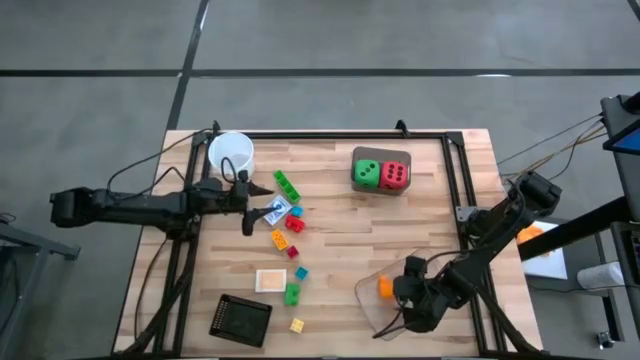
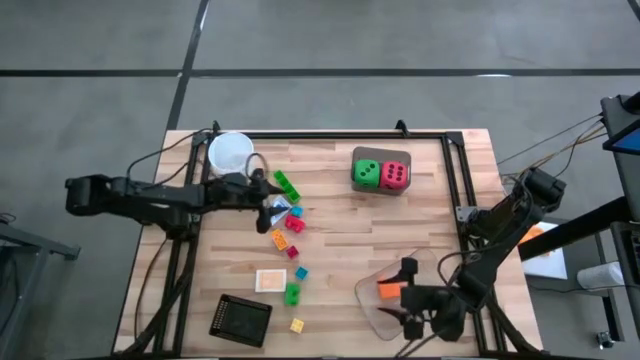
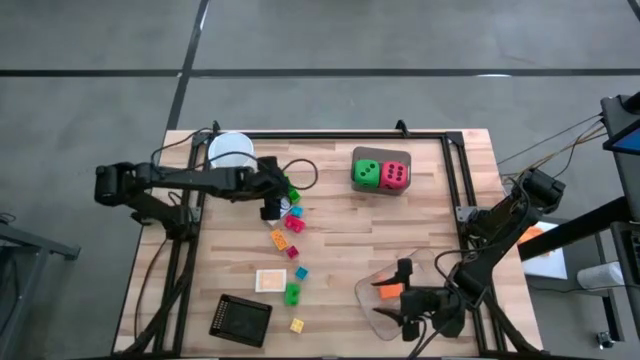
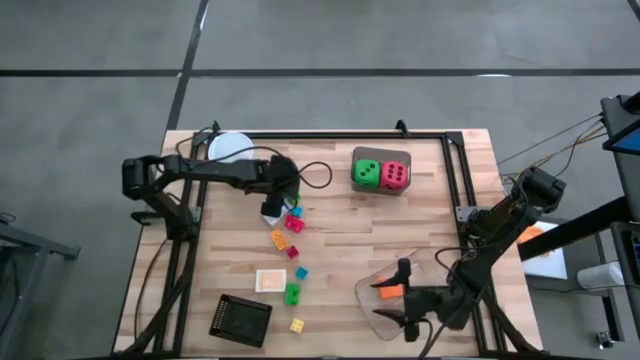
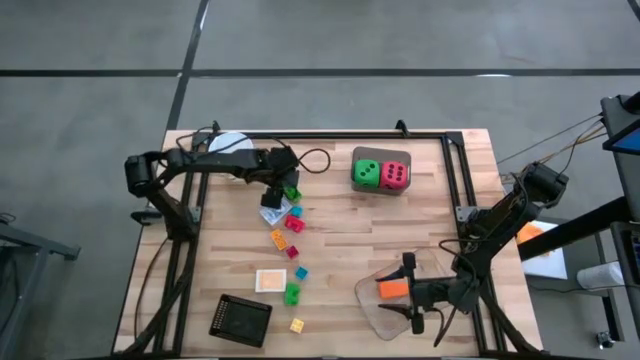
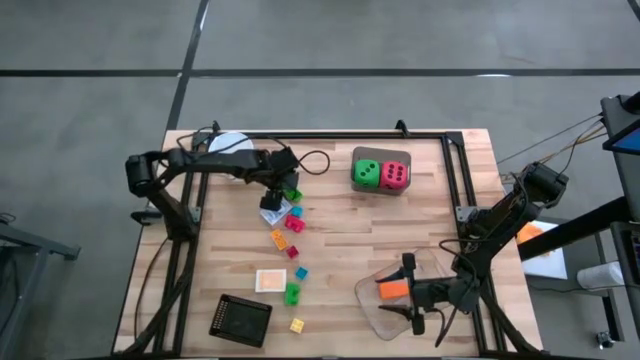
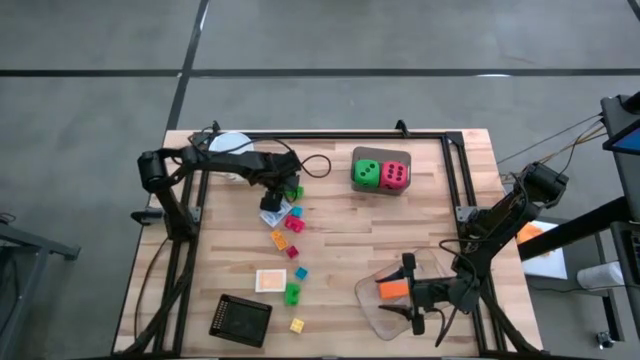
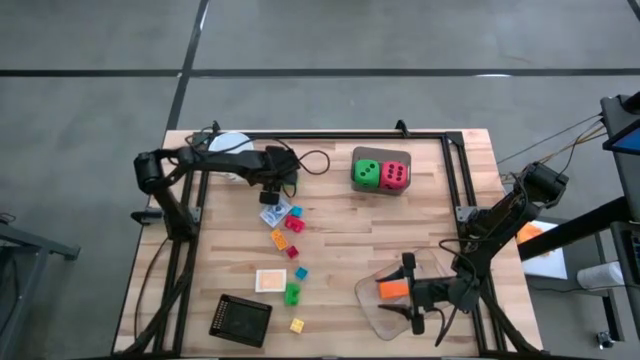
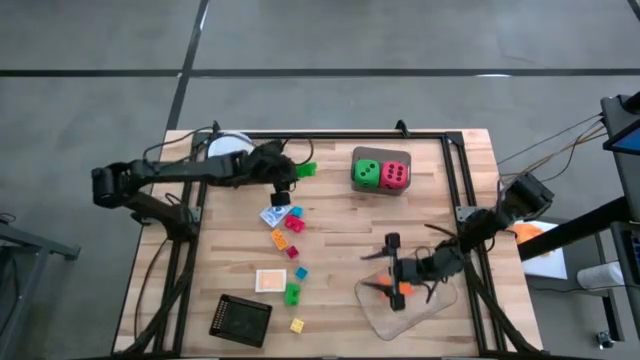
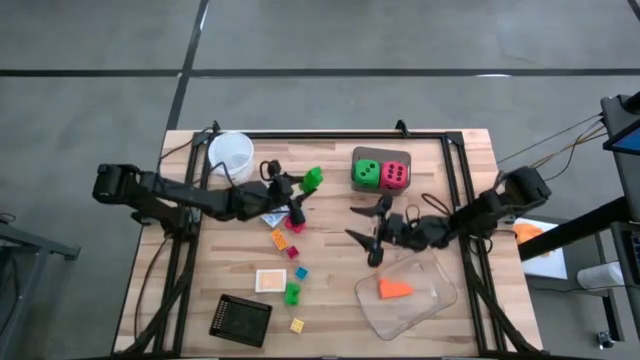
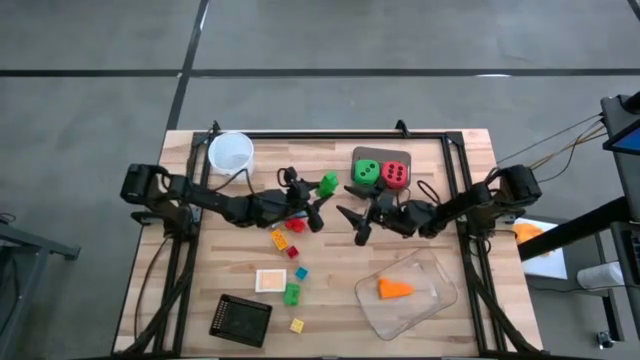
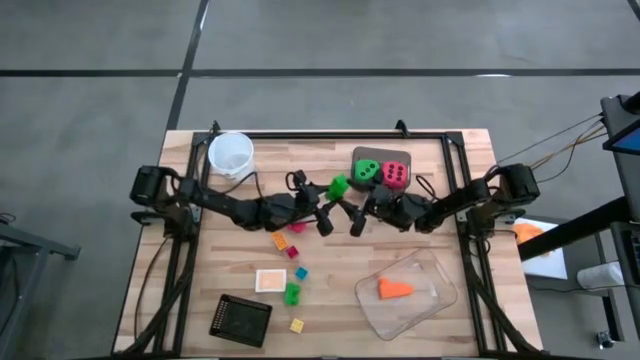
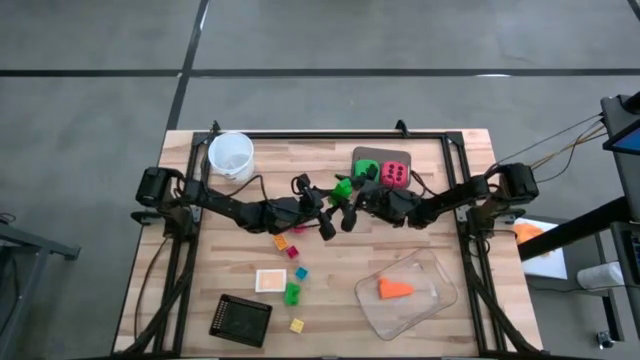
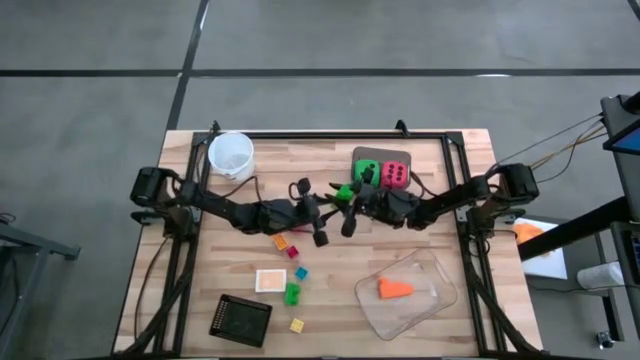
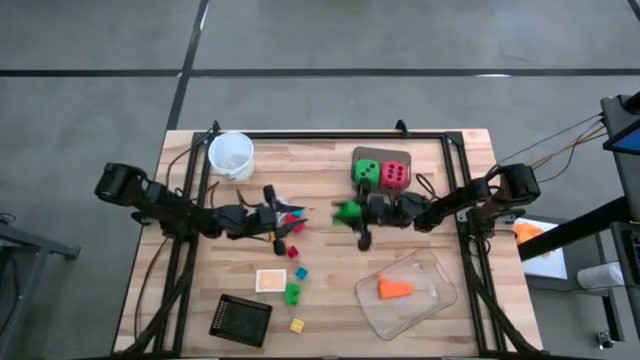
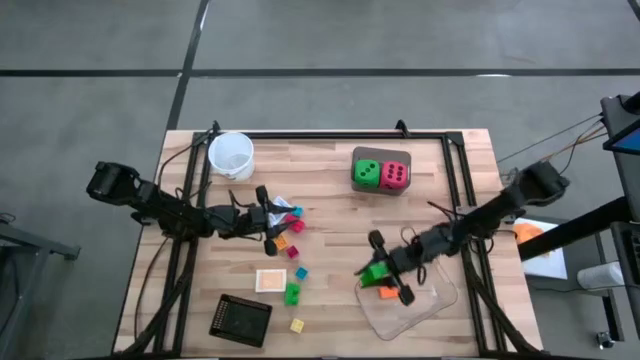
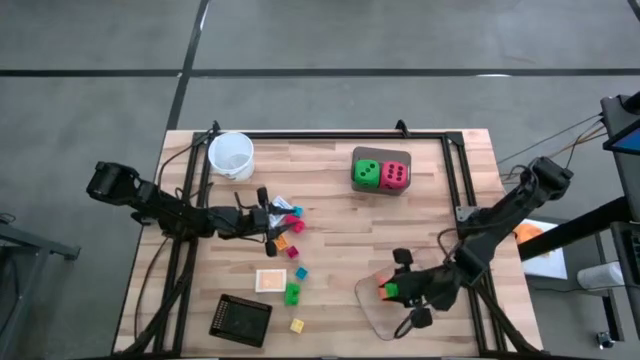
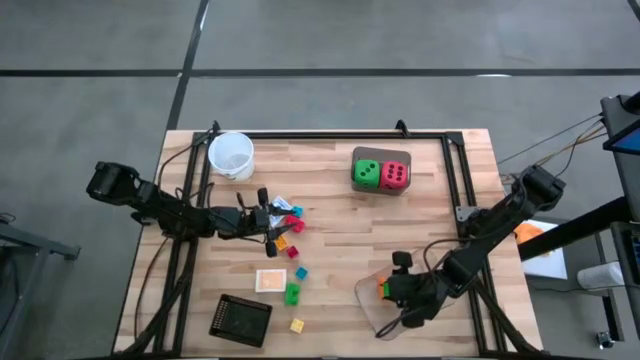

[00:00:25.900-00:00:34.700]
Task: Pick & Place Toys
Put the green game piece into the transparent bin

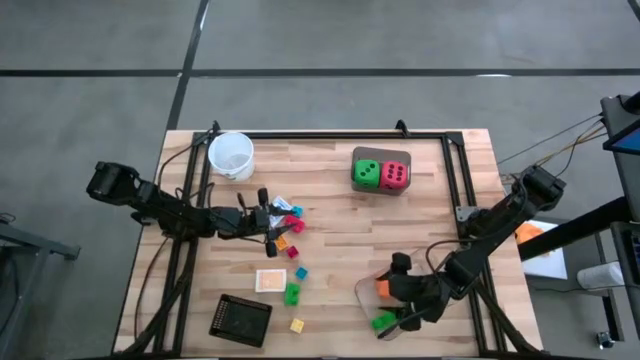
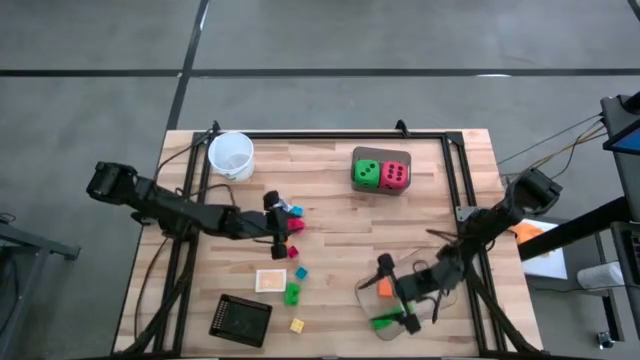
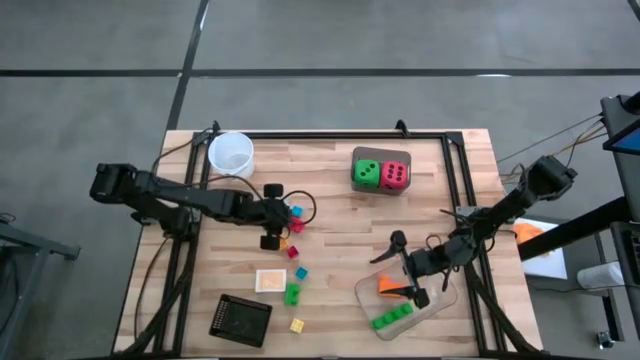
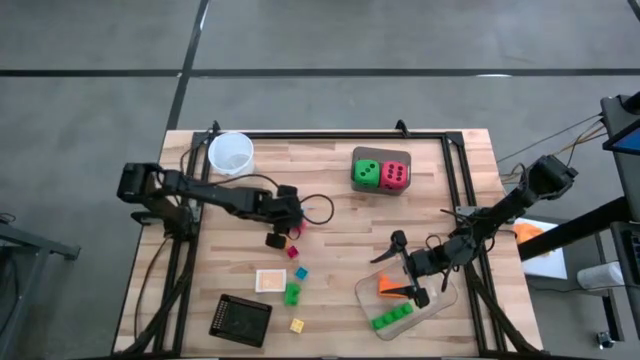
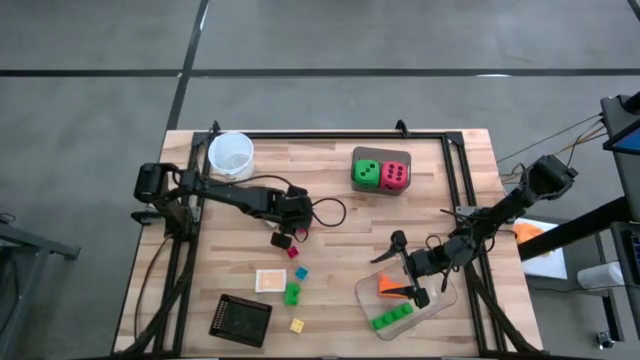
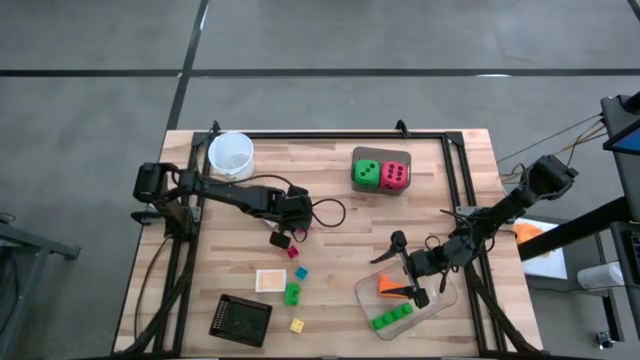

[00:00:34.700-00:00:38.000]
Put the red game piece into the transparent bin

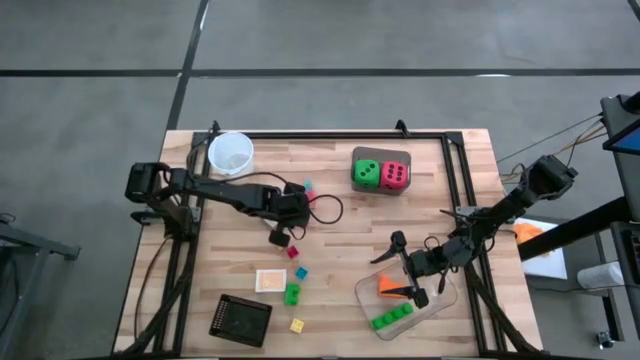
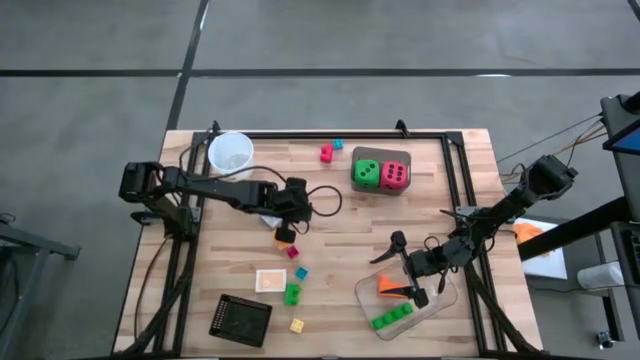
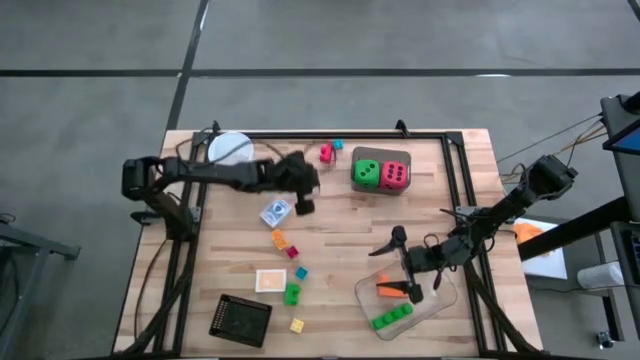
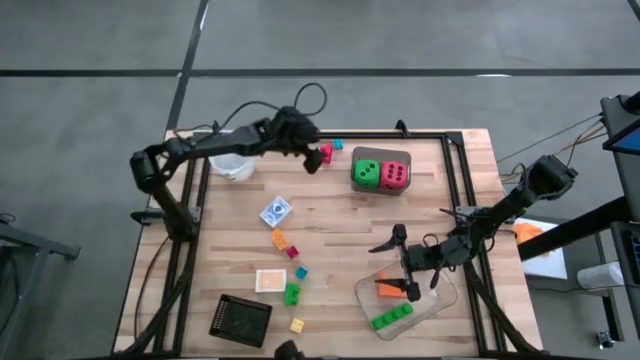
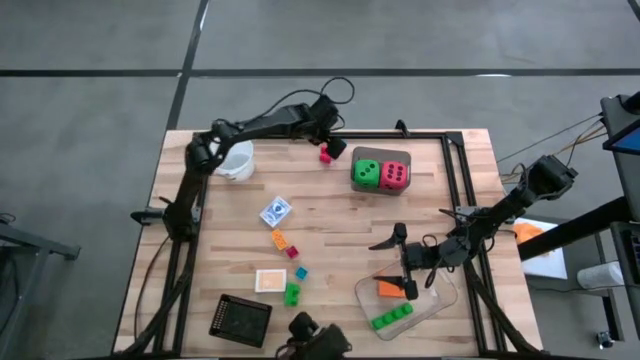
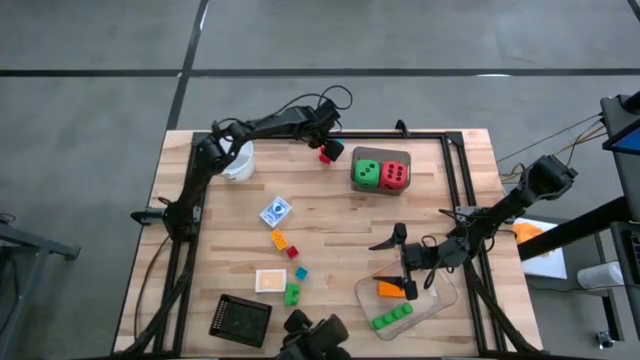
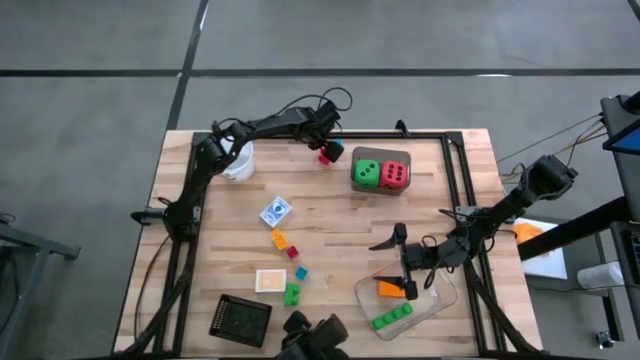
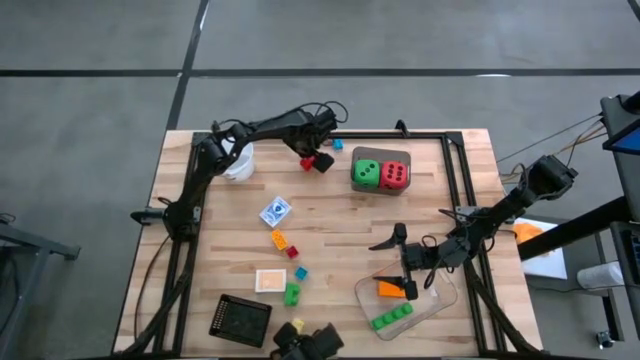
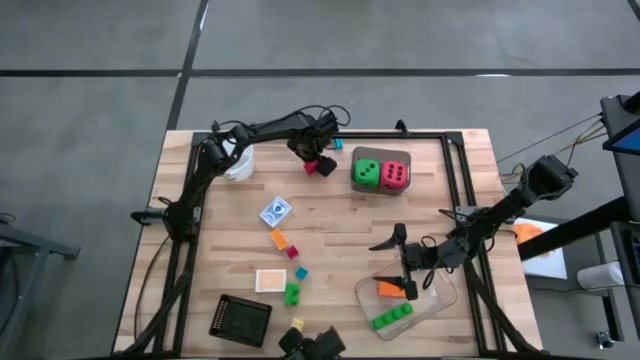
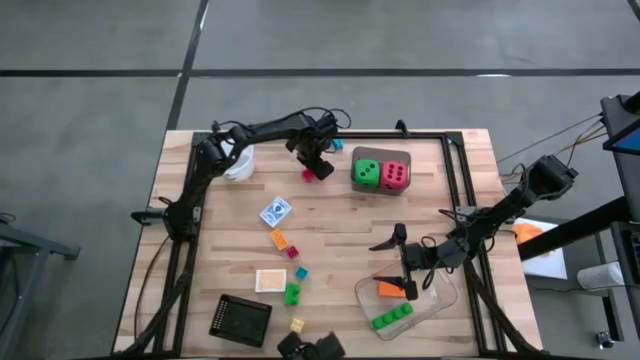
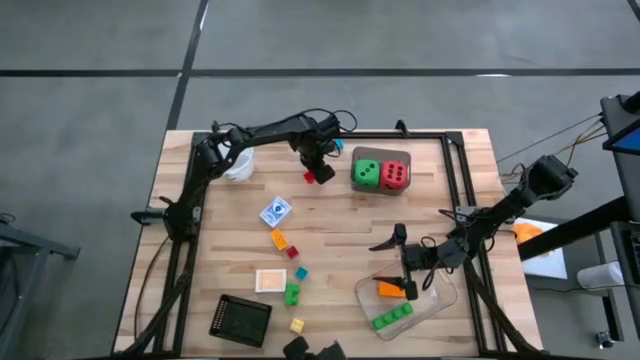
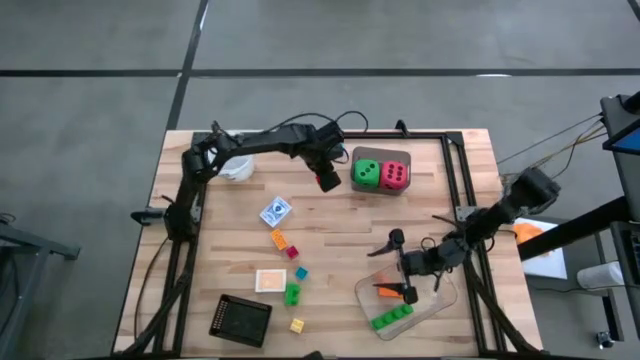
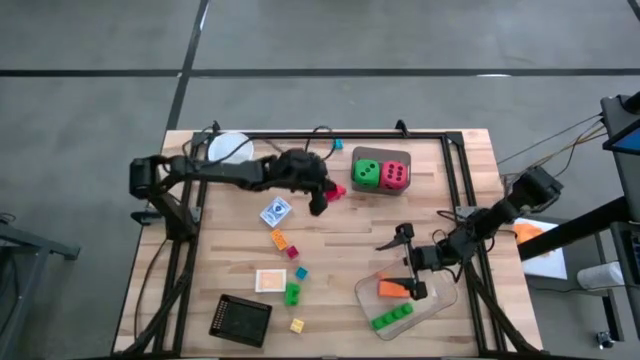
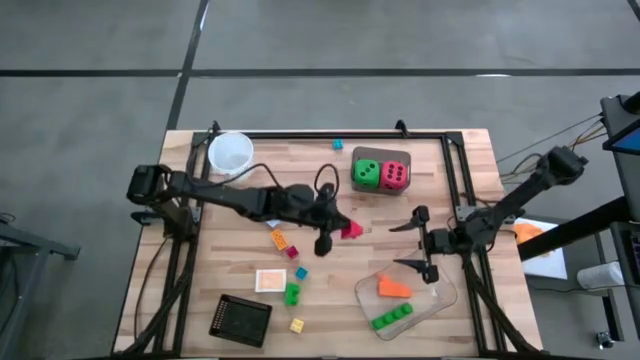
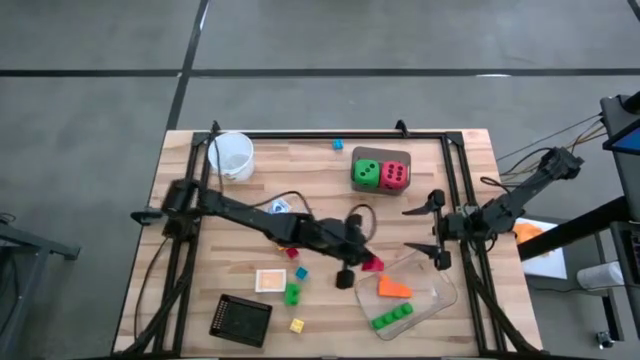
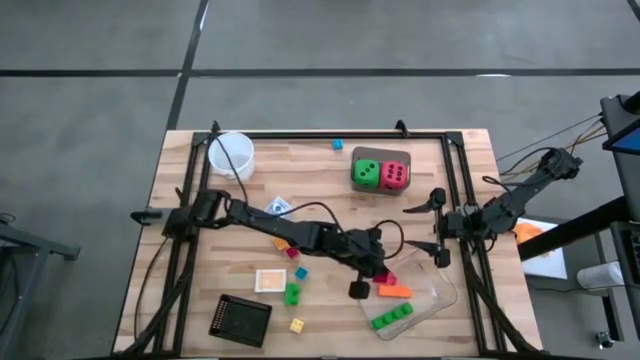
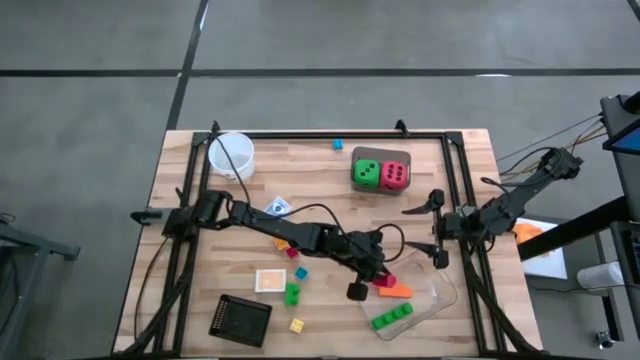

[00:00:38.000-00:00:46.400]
Put the red game piece into the transparent bin

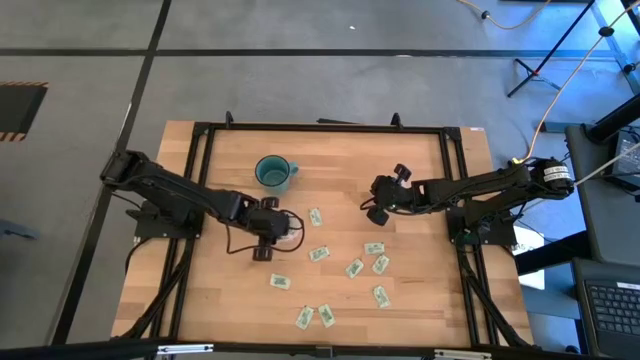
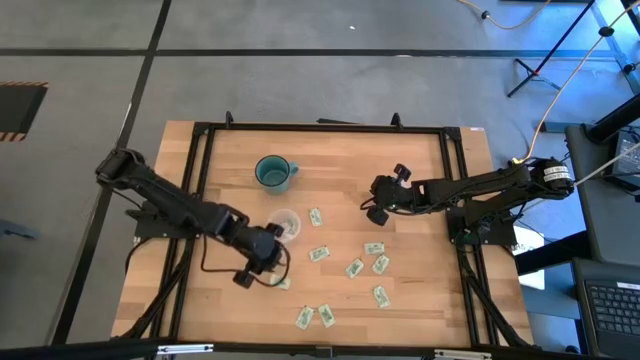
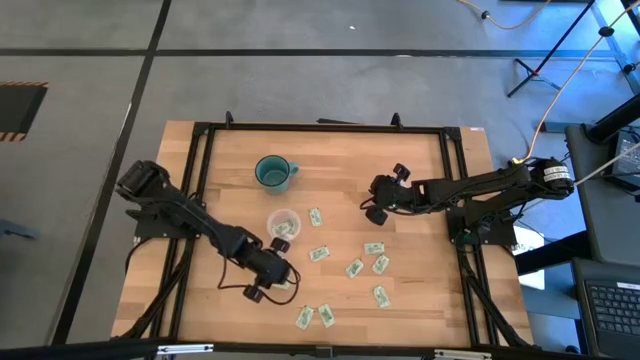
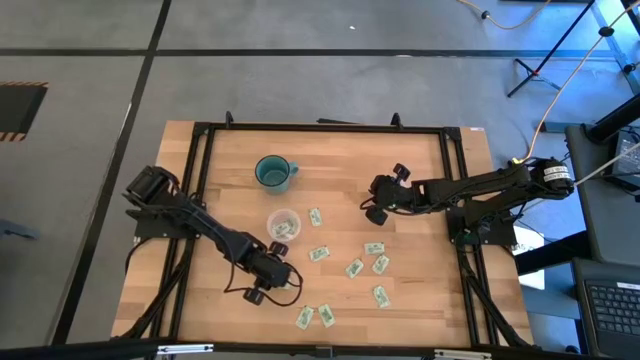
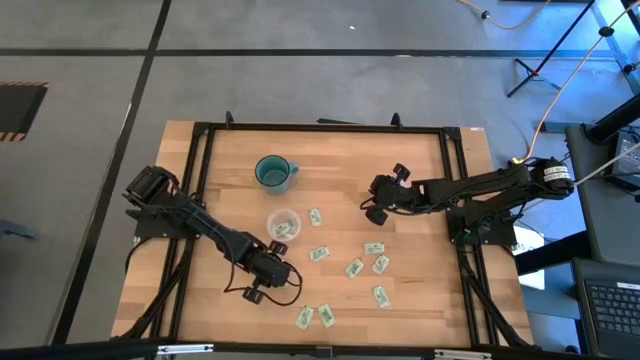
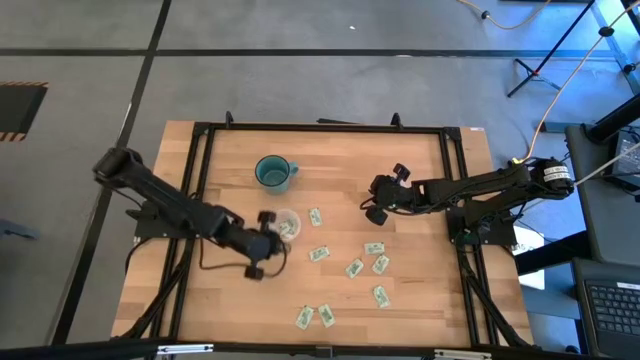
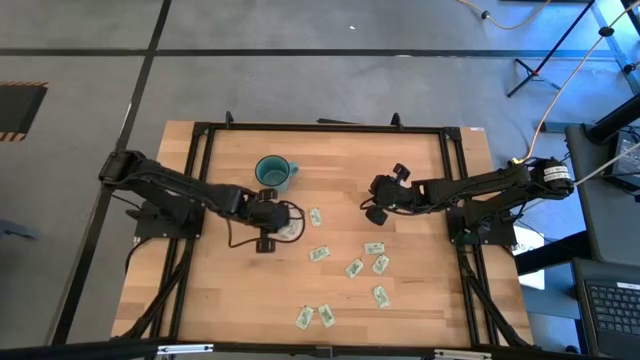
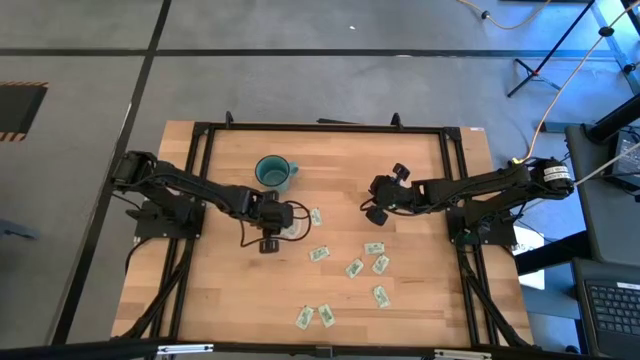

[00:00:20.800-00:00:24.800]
Task: Pick and place Stevia / Truvia into bins
Put the white stevia packet into the left transparent container
